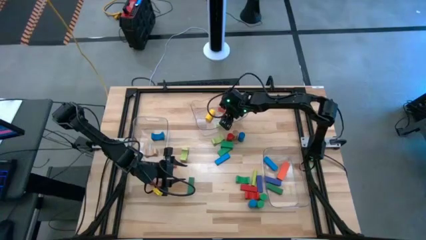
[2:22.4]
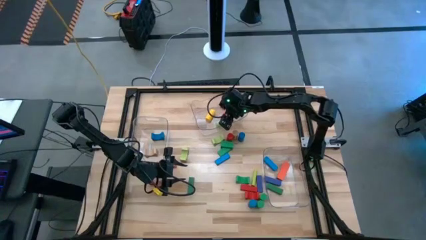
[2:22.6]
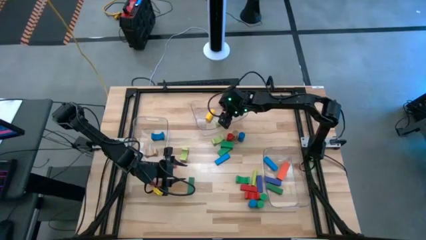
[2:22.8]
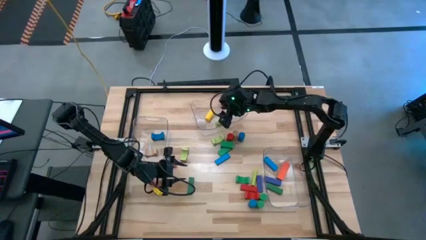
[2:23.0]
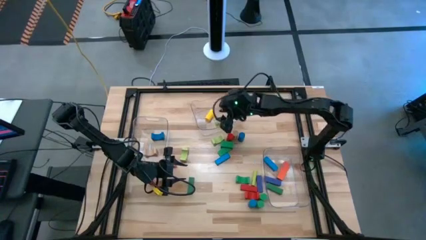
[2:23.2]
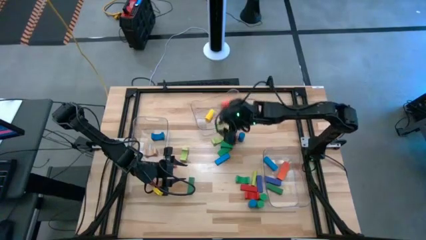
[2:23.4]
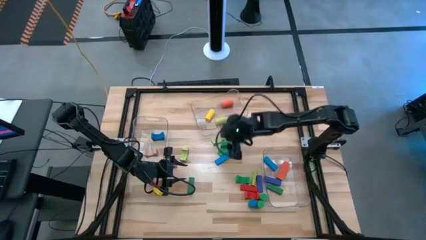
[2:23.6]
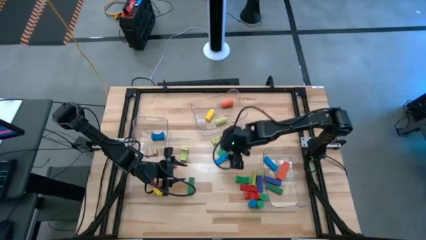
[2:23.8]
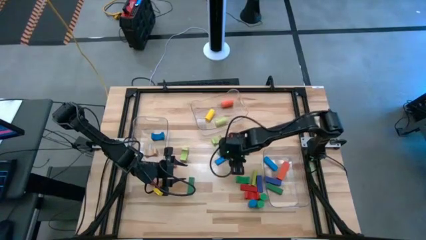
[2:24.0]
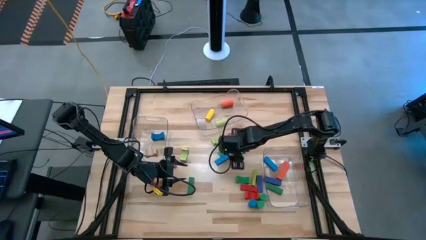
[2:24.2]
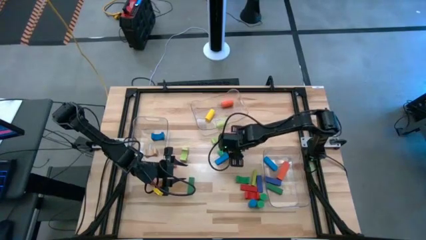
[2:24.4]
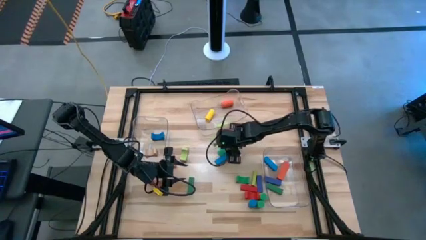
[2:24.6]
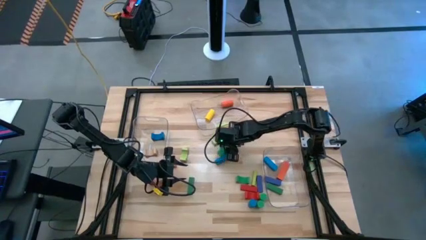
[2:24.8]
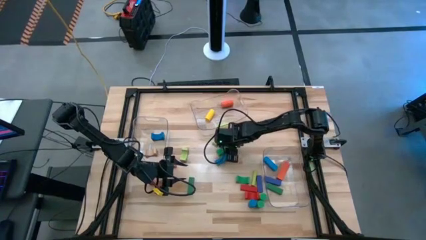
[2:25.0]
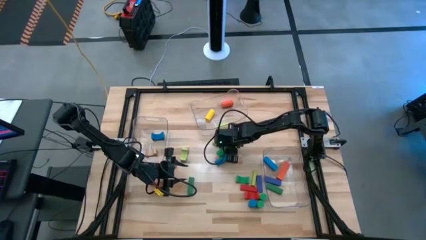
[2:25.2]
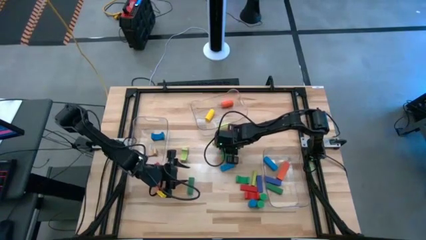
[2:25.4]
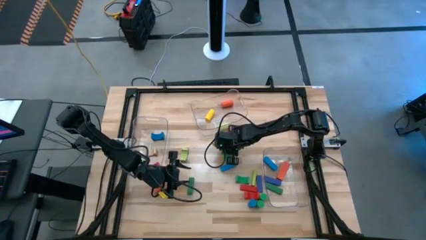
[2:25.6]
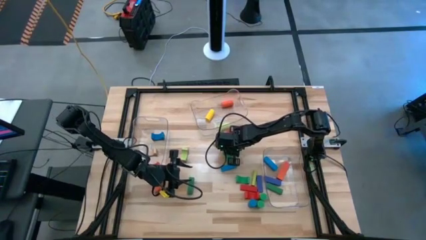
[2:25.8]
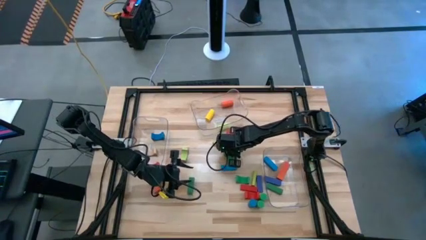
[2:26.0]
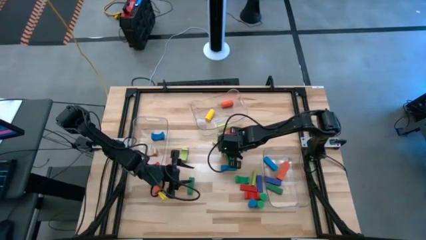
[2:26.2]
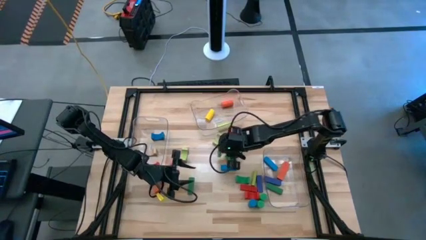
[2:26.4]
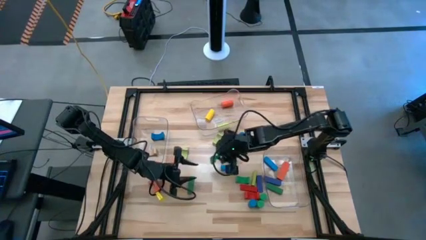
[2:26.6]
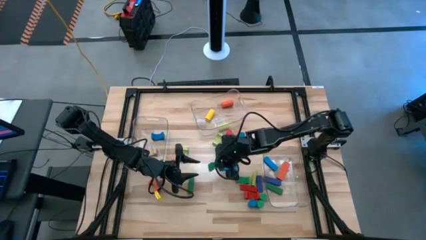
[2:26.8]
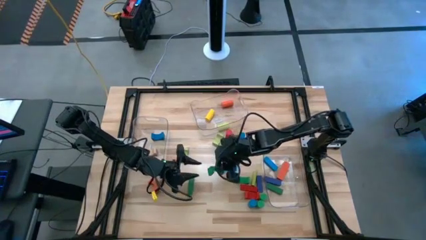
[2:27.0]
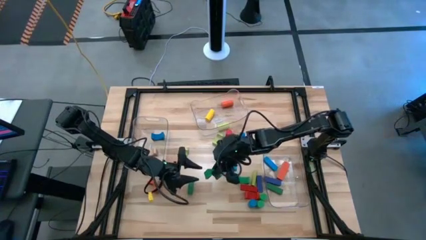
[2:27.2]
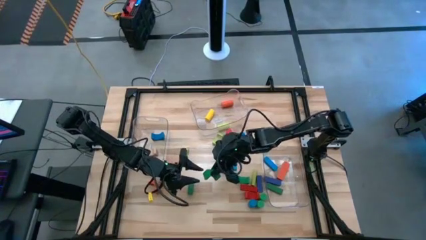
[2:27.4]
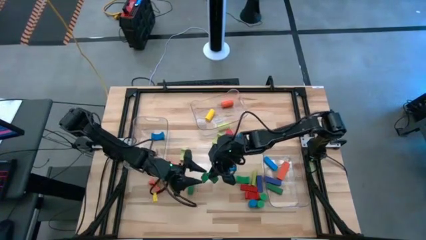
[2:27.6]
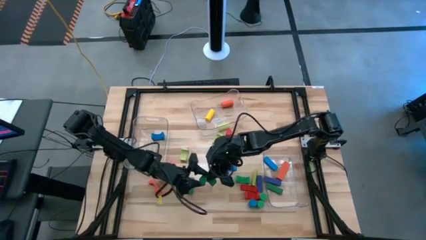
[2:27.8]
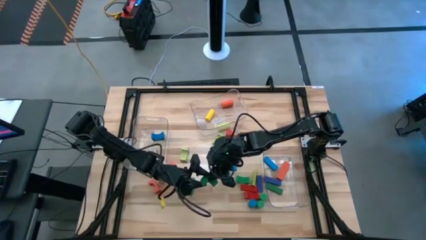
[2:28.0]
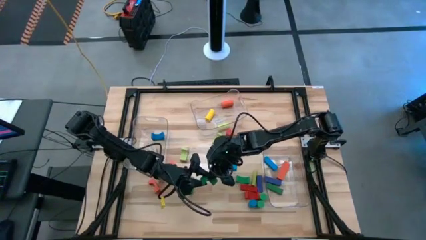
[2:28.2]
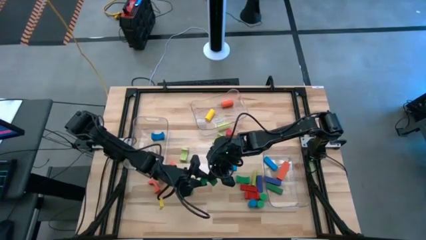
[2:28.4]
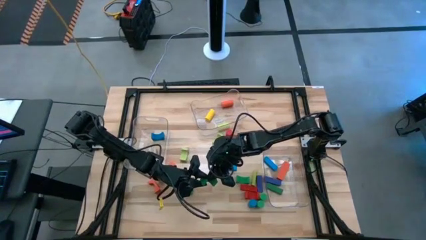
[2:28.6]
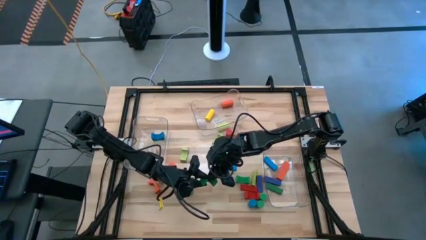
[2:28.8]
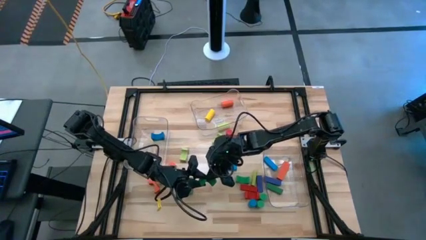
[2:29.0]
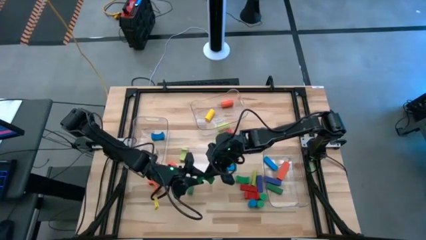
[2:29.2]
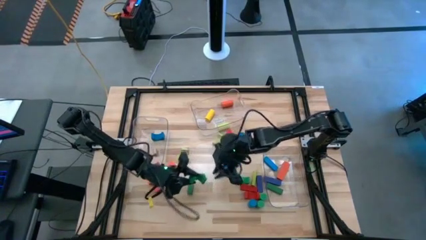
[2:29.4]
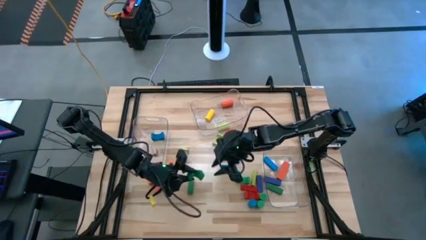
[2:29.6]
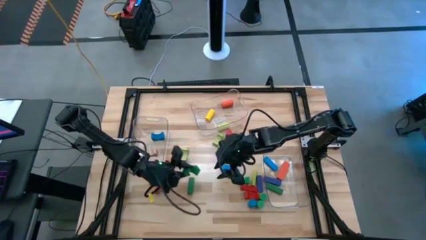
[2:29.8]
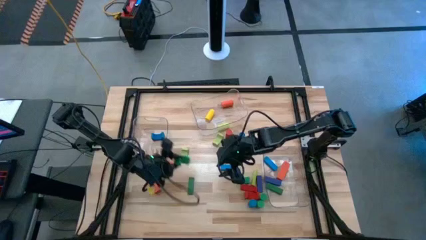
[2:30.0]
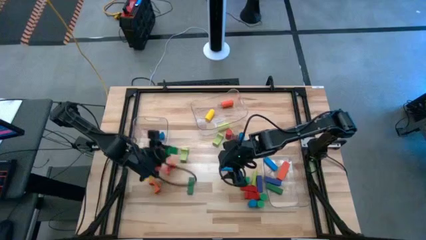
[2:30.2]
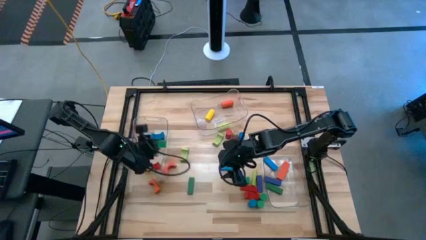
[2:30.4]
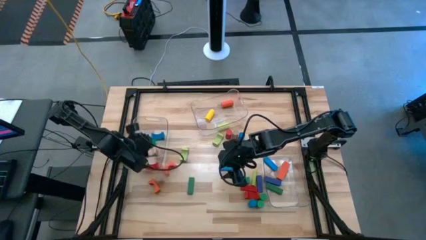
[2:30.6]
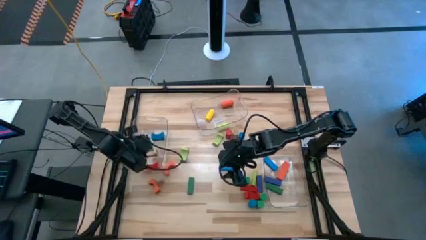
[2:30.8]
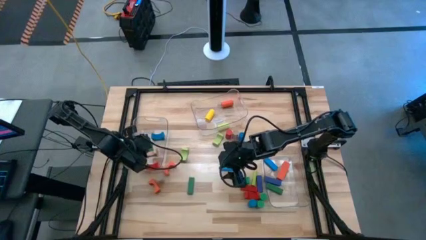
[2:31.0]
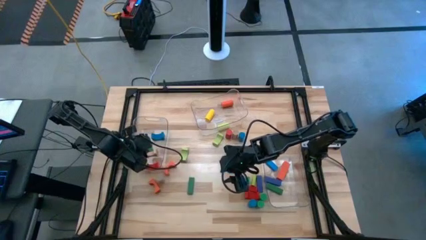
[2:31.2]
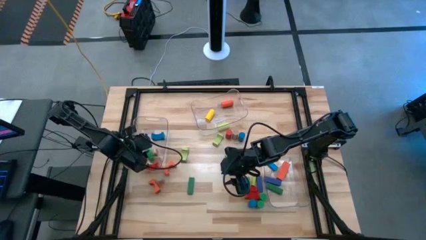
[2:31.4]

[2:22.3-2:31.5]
Task: Sort blocks by size
Put the green arch block into the left transparent bin

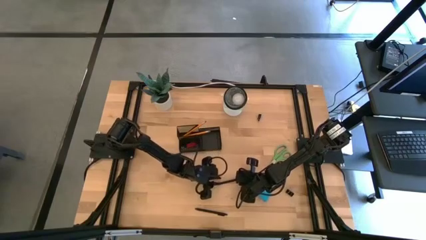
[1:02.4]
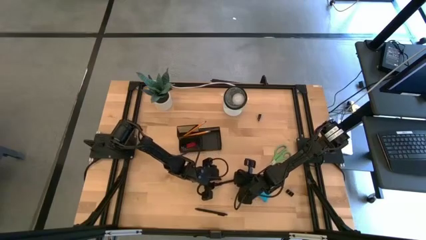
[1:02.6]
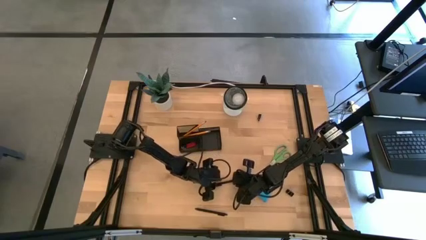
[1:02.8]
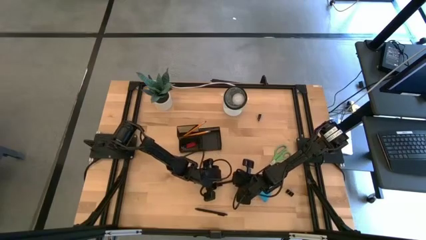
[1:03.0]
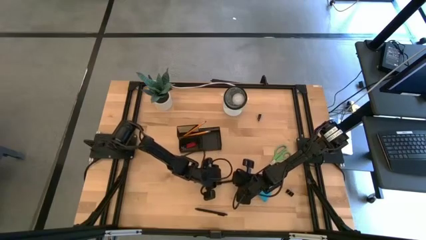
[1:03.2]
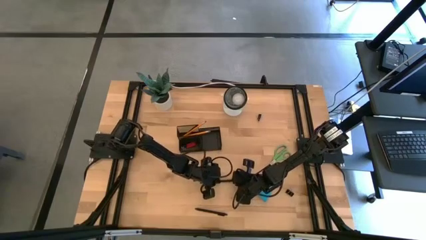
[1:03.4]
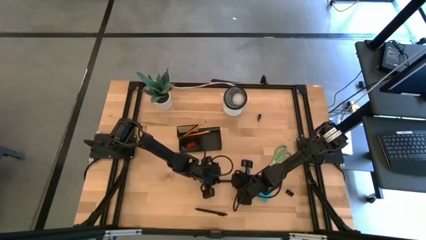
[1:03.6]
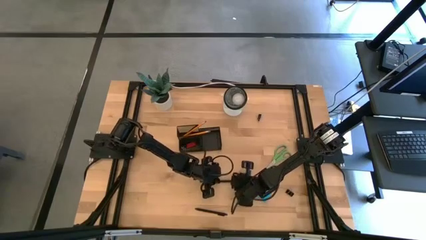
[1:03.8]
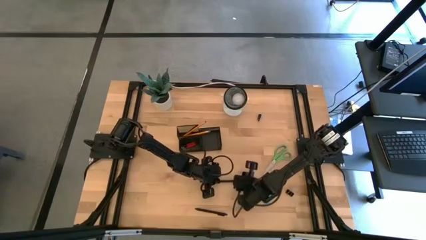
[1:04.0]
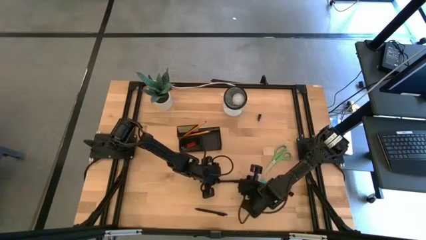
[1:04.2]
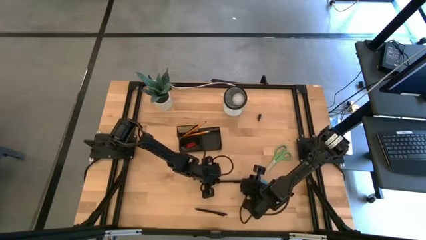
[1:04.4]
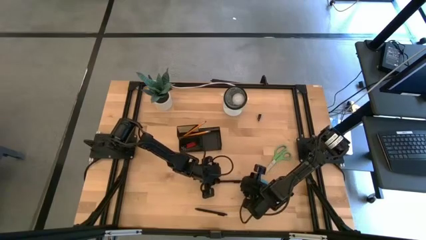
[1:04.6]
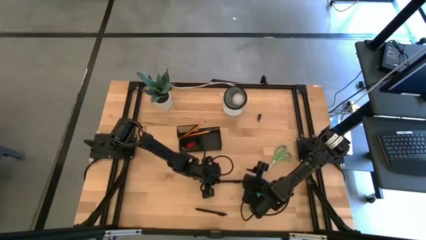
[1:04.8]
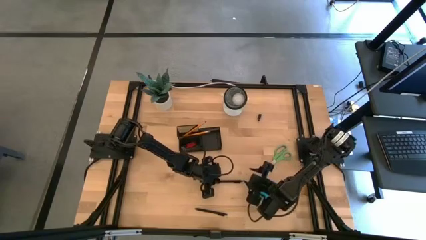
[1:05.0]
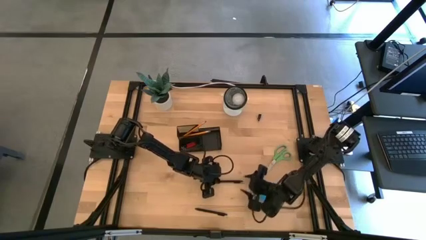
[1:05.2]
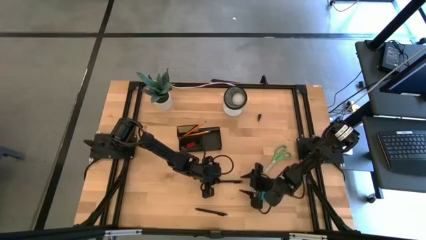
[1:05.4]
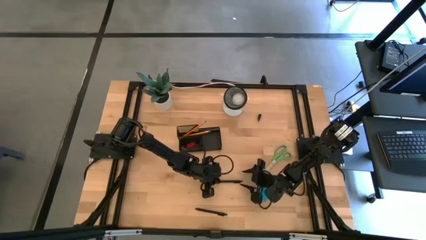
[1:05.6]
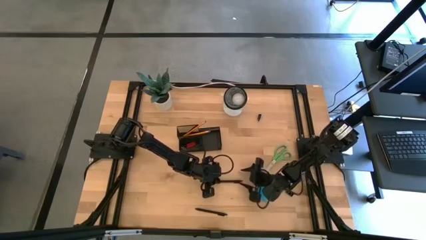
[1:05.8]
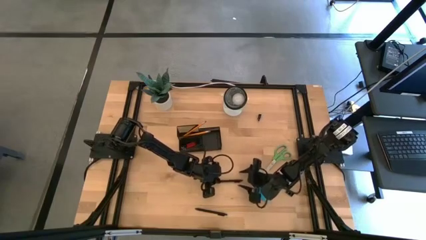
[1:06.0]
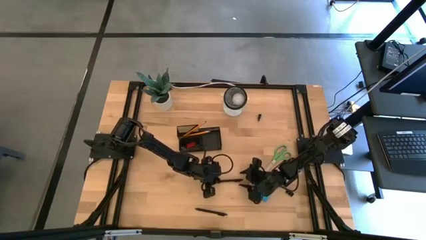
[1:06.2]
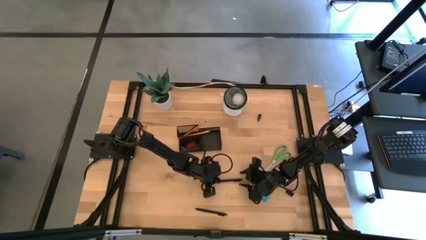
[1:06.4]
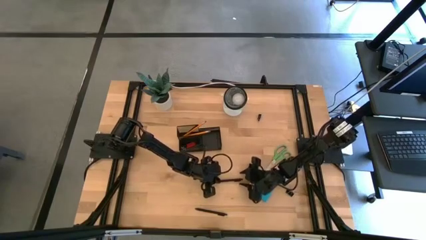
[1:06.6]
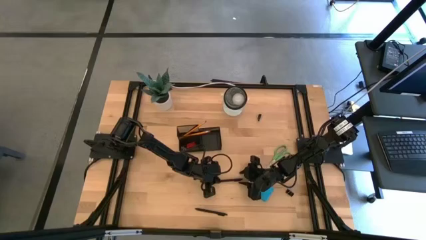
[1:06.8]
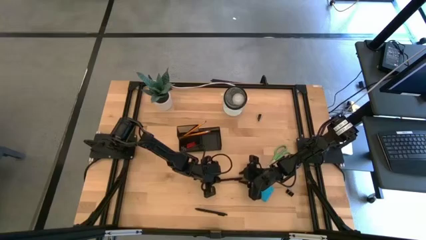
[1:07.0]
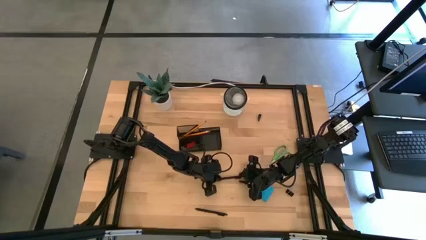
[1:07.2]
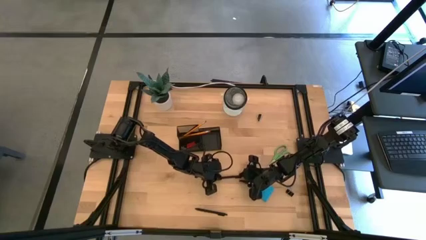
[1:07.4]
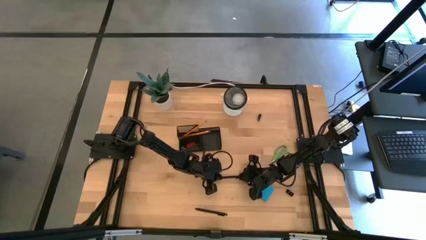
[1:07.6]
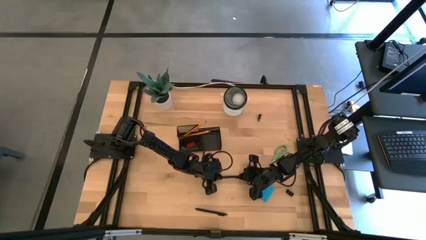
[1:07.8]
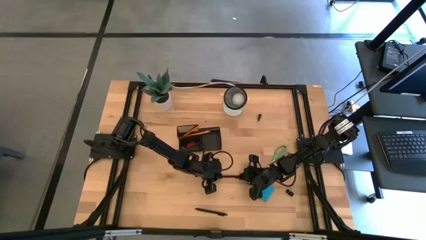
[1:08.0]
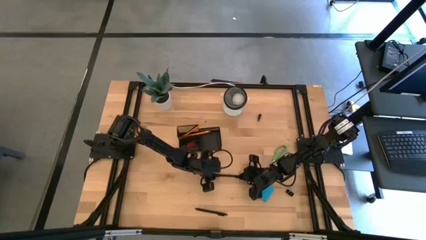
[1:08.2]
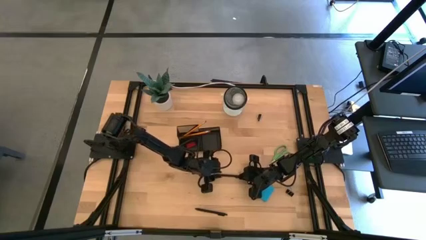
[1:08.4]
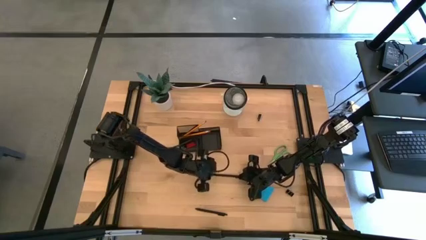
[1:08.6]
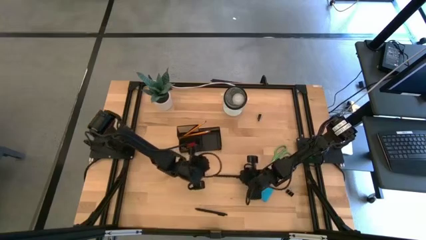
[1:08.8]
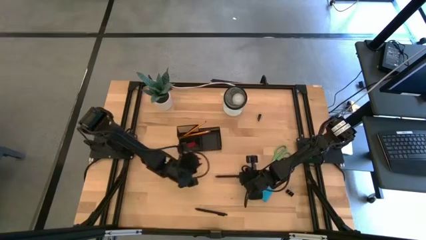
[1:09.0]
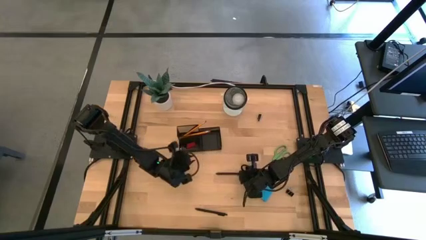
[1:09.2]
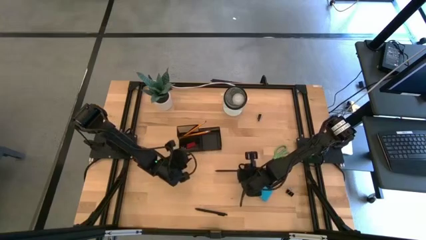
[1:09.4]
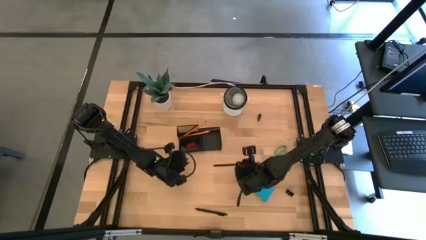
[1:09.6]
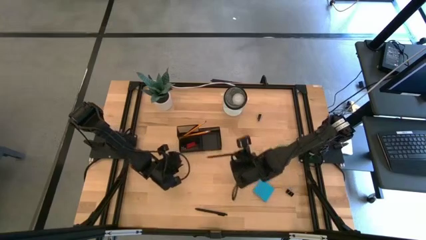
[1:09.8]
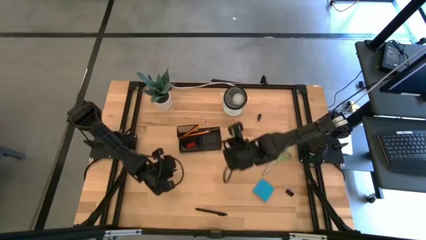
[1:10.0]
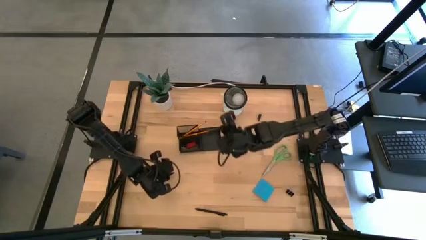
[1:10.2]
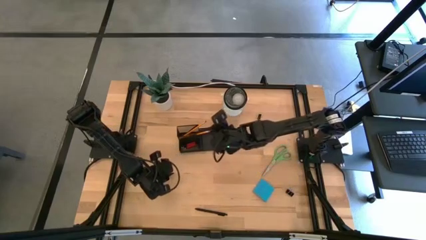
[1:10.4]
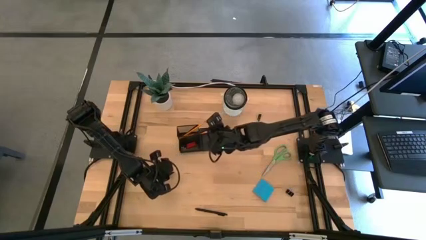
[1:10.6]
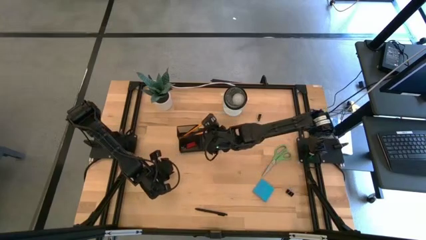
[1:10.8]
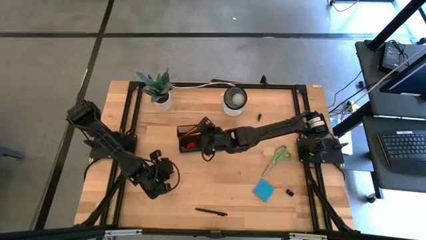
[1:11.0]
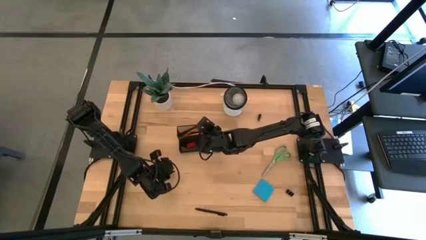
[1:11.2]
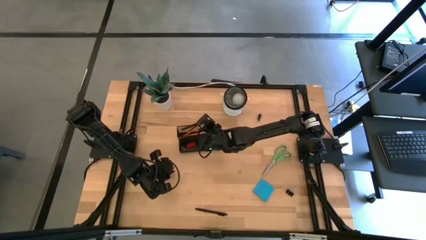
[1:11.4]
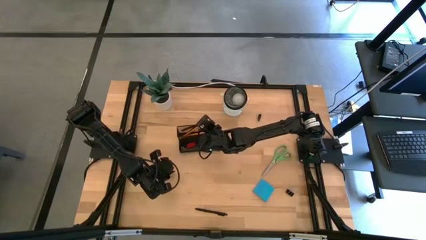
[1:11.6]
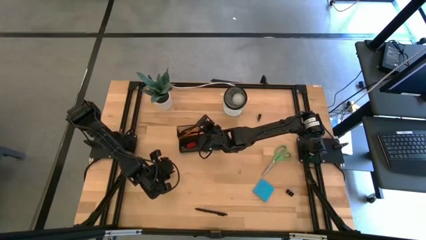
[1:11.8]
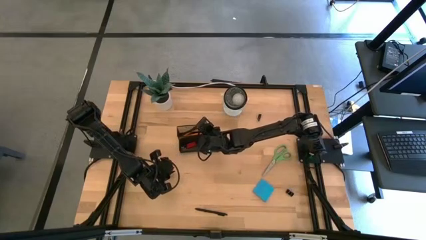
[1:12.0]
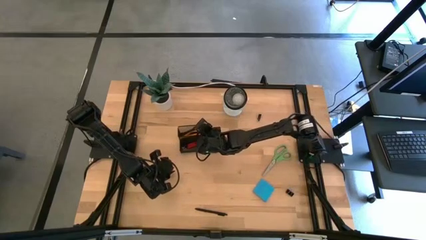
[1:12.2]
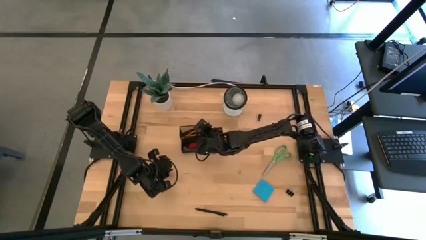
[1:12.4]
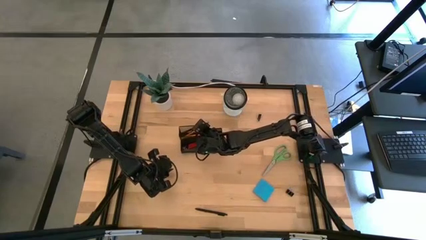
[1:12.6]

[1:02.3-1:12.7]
Task: Pick and place office supplies into organizer
Put the top right black pen in the desk organizer
